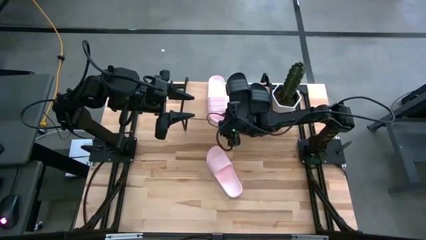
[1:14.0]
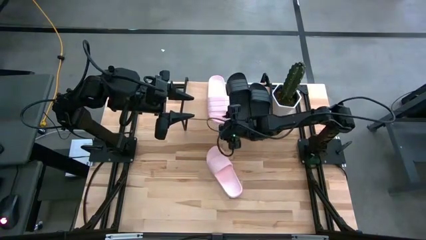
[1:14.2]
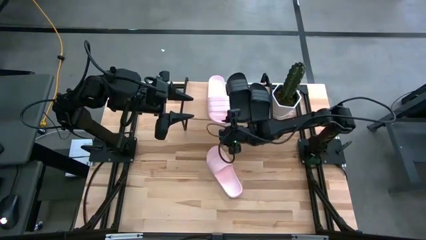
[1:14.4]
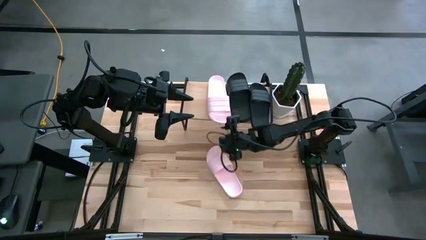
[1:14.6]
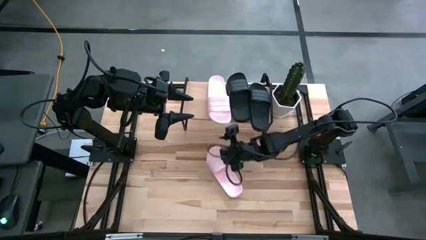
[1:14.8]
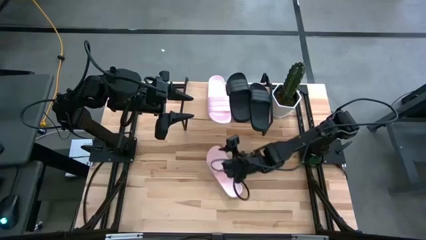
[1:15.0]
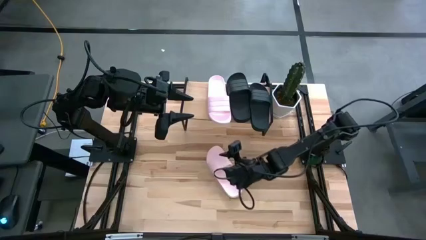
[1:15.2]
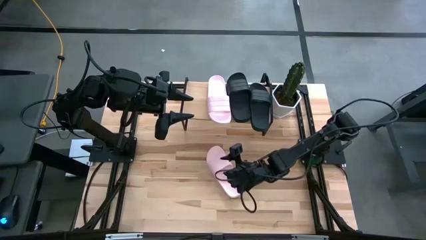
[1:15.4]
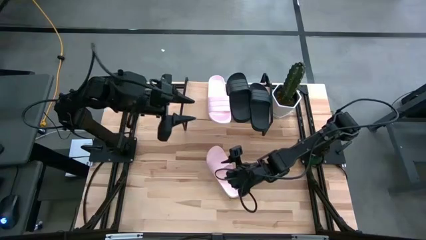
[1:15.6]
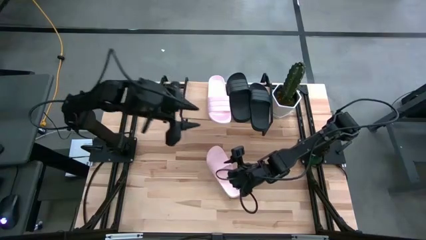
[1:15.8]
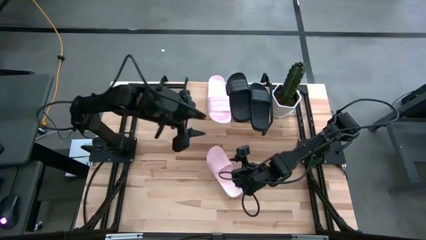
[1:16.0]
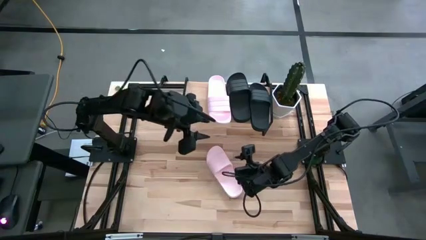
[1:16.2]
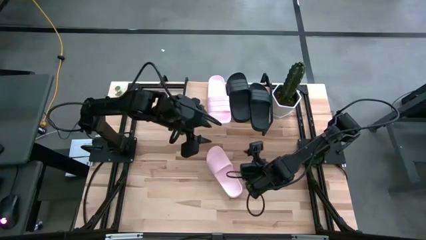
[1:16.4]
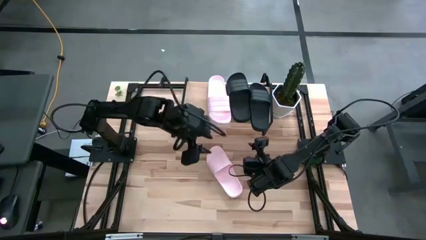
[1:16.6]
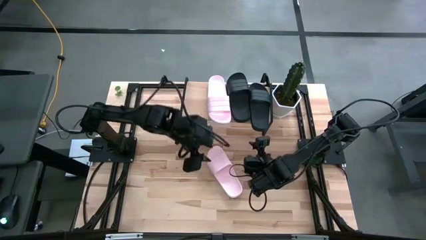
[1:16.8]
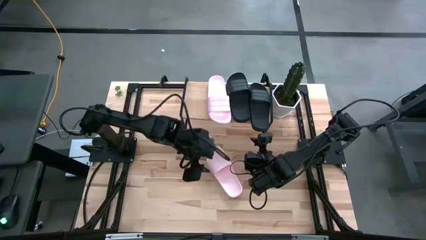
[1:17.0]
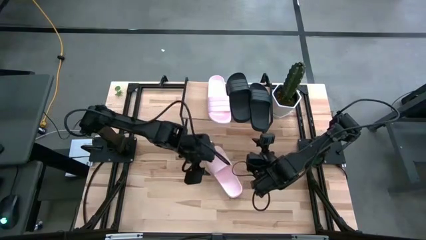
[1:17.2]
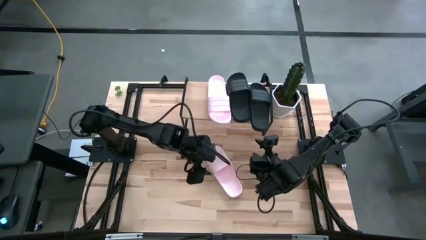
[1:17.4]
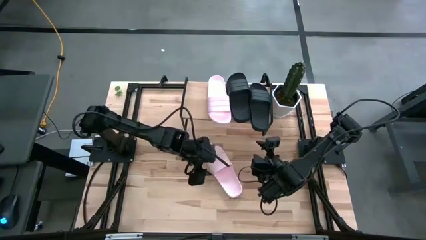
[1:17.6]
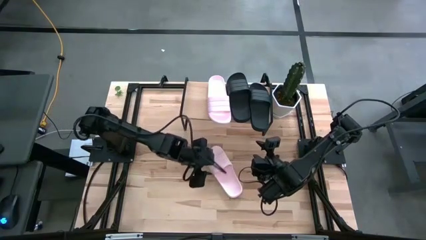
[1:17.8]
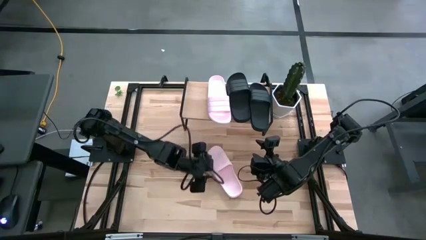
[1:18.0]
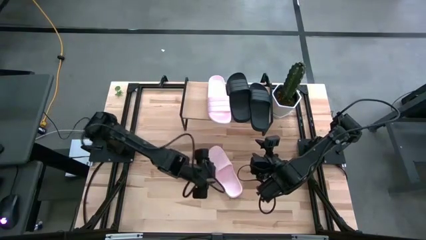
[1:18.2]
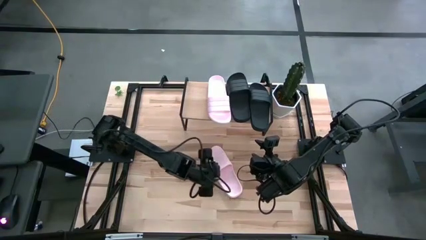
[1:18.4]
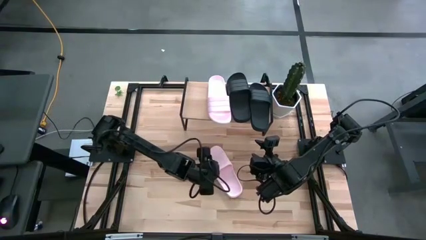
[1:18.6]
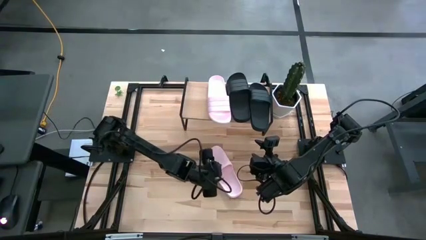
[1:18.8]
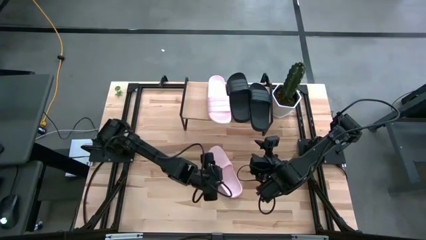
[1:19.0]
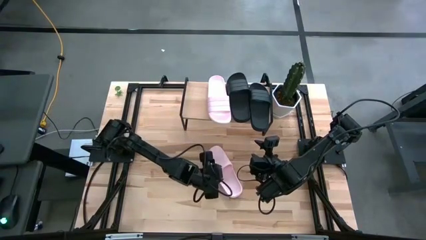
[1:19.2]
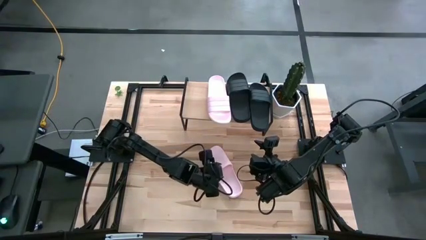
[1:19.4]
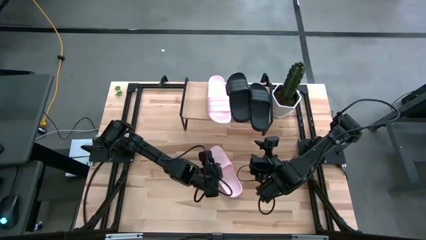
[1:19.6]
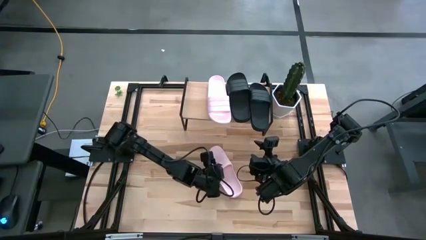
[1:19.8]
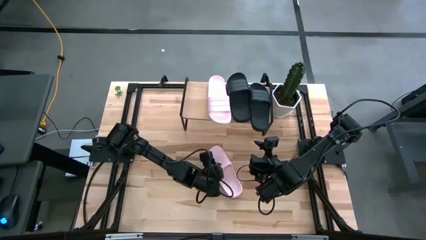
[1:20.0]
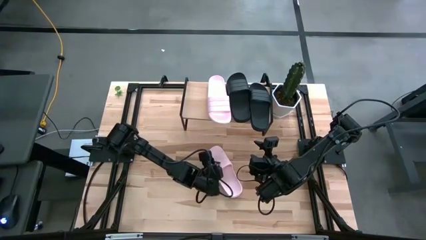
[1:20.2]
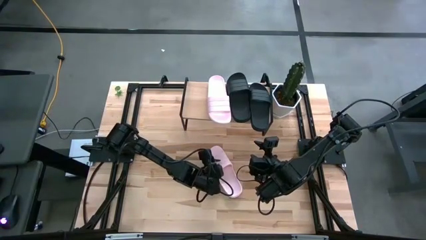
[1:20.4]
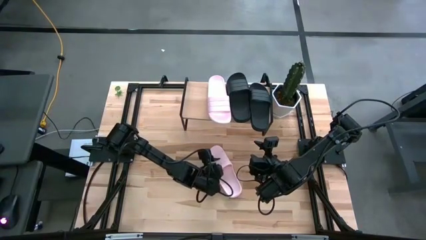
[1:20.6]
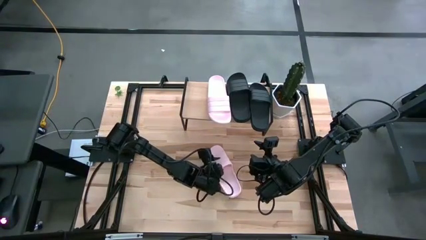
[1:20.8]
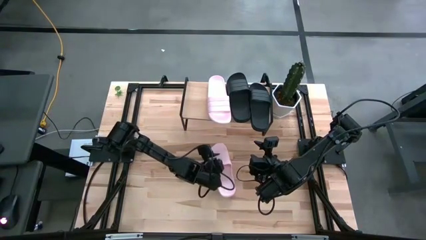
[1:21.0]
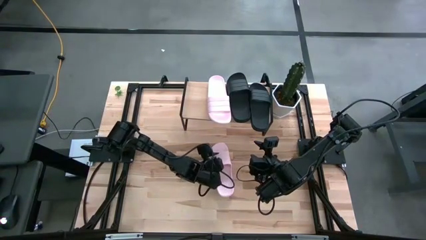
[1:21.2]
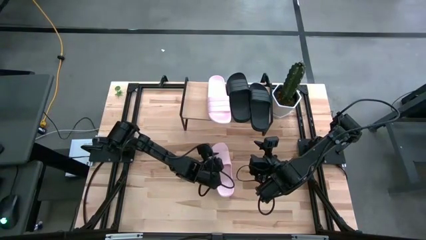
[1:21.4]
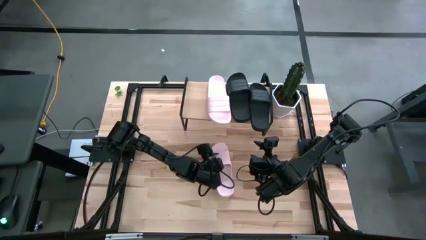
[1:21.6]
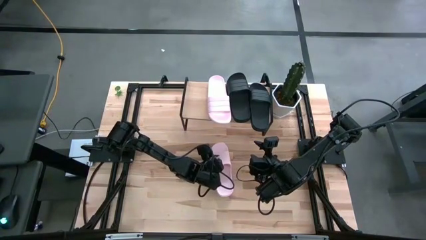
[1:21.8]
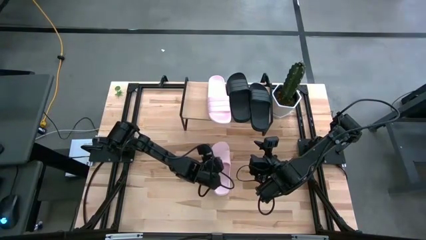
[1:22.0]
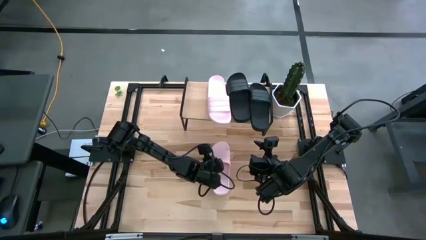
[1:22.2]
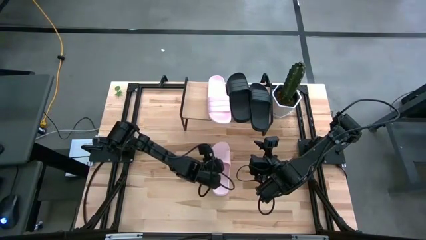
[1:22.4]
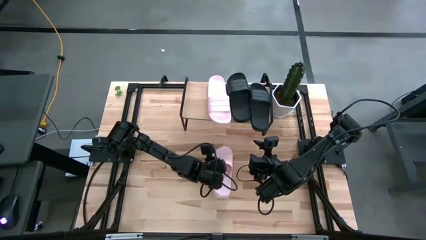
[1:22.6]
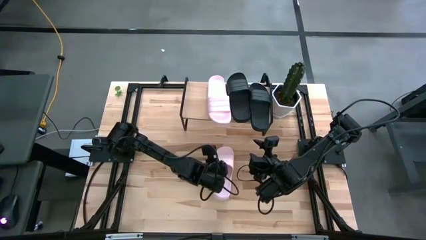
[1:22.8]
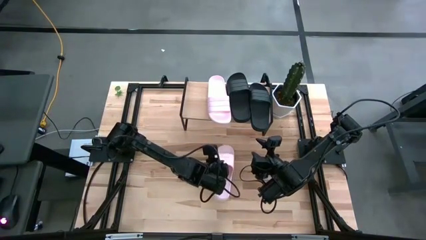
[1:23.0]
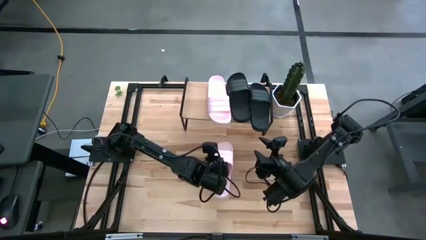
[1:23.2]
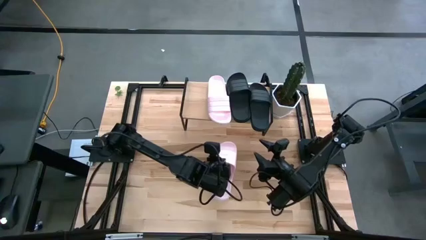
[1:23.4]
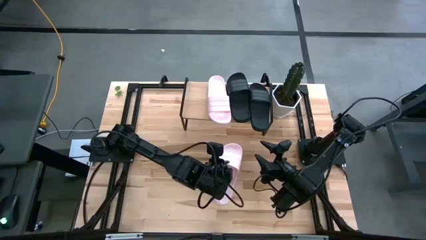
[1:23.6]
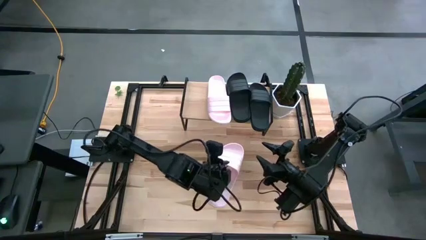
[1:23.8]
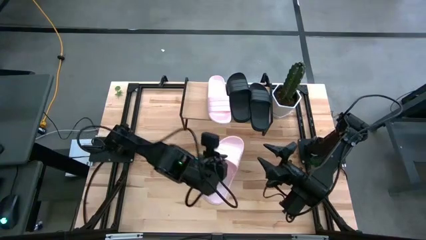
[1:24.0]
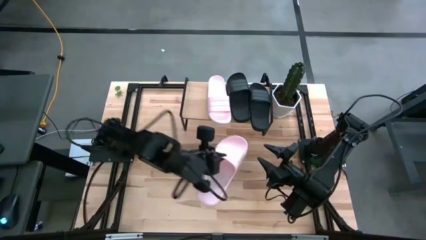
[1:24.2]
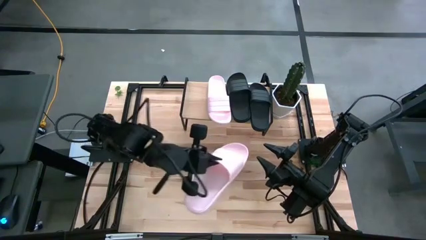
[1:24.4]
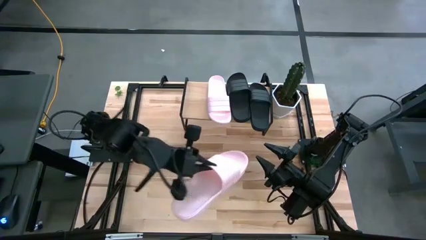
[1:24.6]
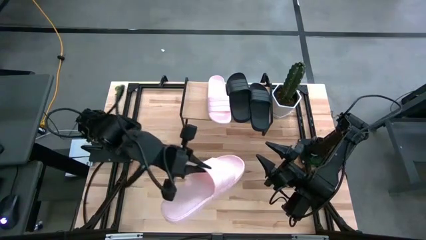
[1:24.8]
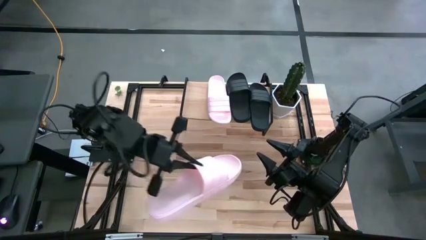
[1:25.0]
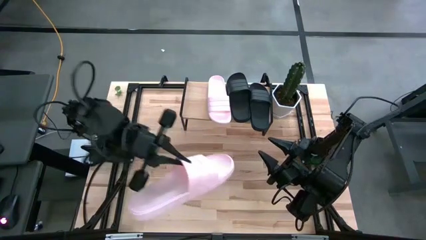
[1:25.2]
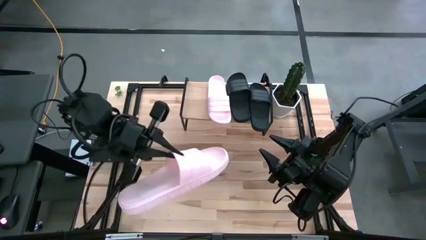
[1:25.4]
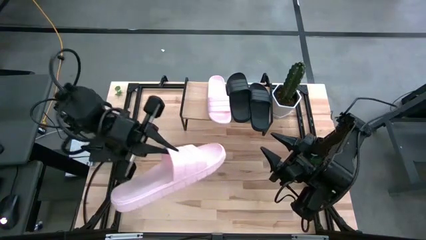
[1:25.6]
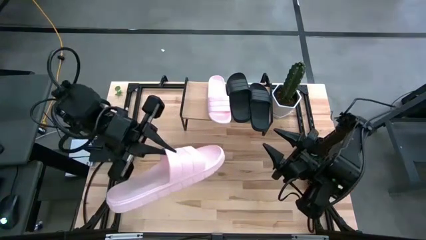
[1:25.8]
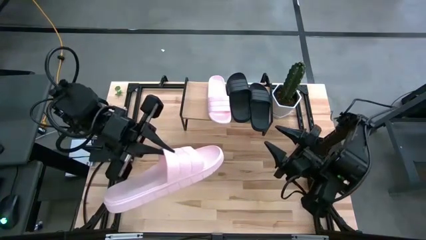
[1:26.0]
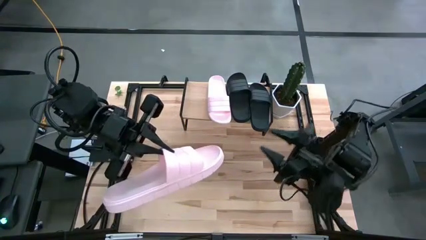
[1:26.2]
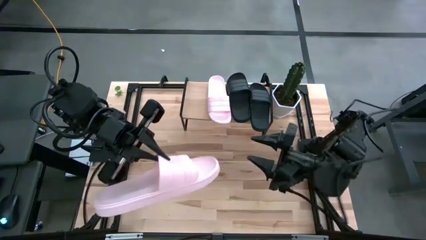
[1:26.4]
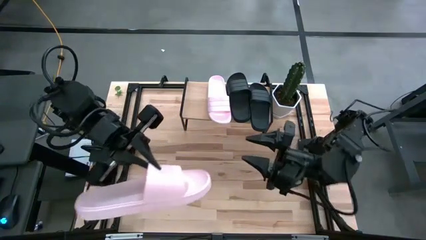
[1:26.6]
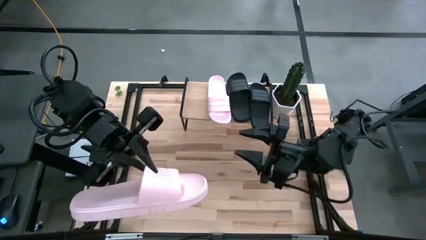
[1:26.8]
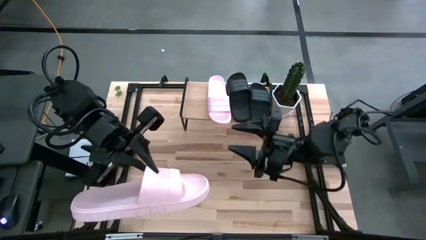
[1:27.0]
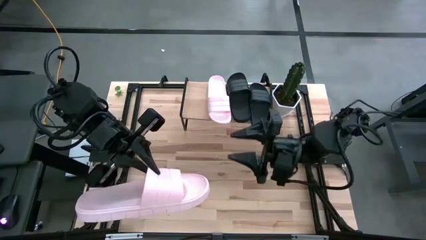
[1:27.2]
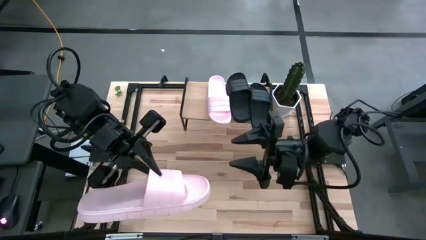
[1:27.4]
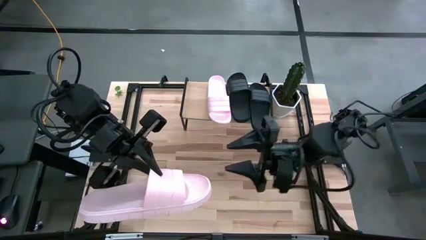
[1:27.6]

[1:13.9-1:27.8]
Task: Pick and place slides into the shelf
Put the pink slide on the shelf

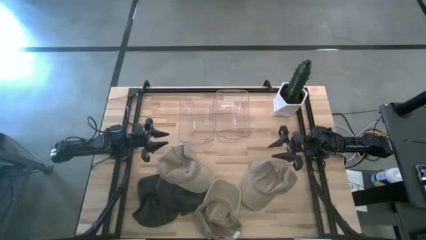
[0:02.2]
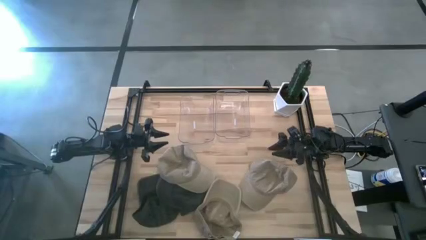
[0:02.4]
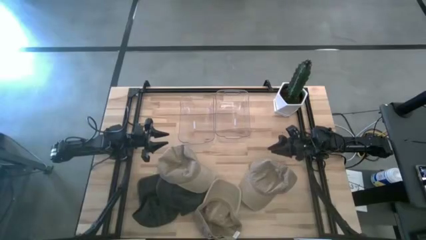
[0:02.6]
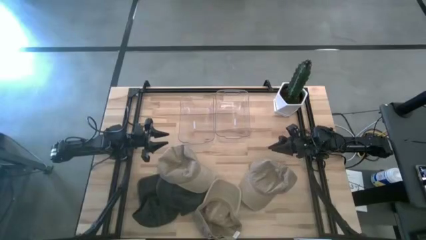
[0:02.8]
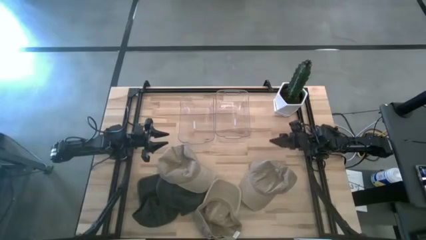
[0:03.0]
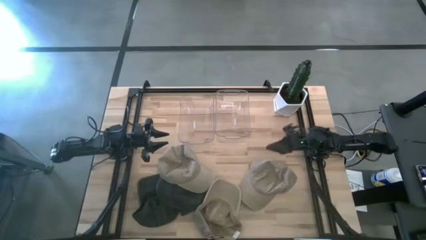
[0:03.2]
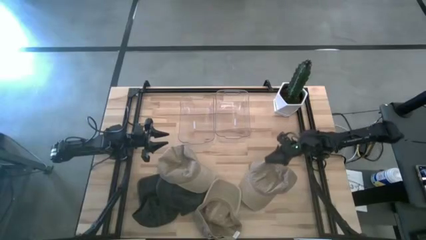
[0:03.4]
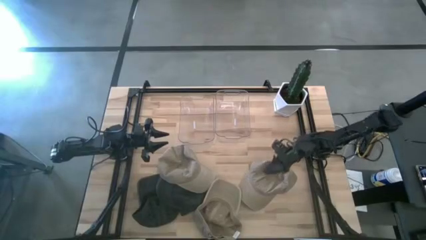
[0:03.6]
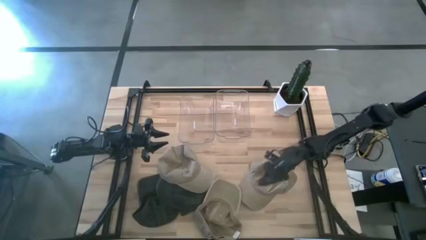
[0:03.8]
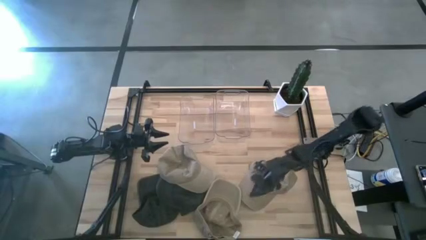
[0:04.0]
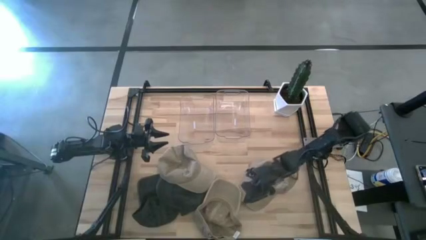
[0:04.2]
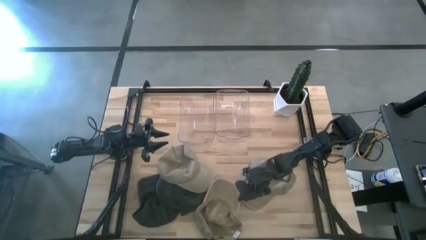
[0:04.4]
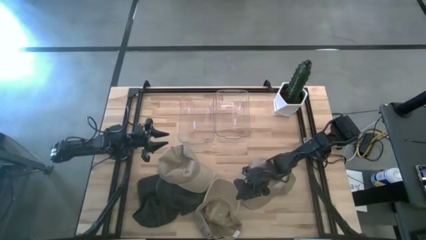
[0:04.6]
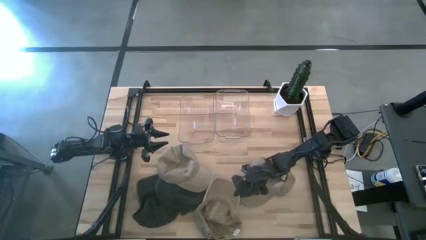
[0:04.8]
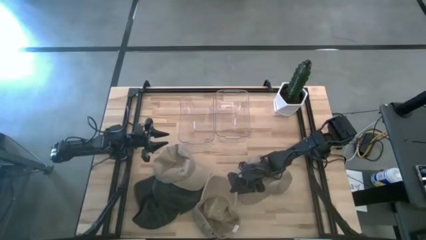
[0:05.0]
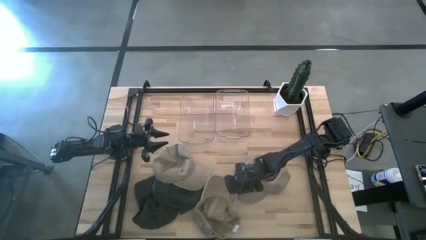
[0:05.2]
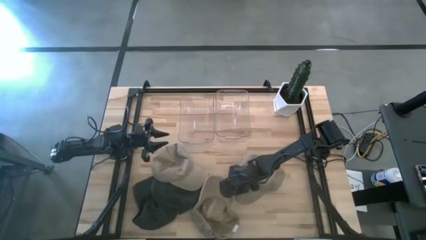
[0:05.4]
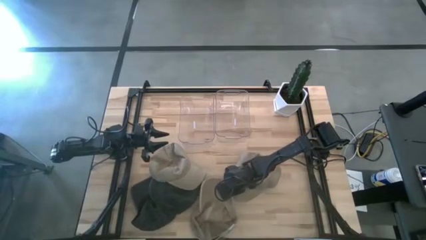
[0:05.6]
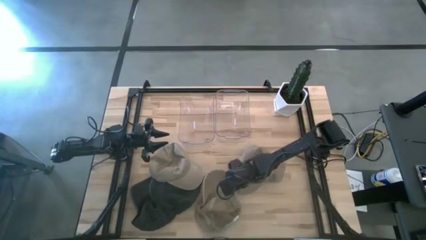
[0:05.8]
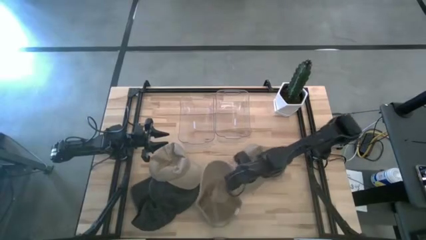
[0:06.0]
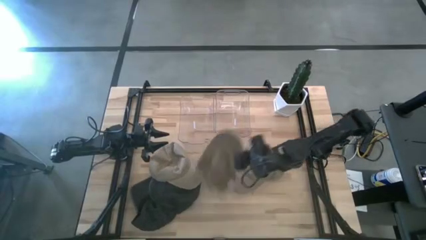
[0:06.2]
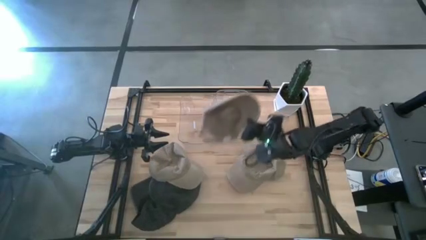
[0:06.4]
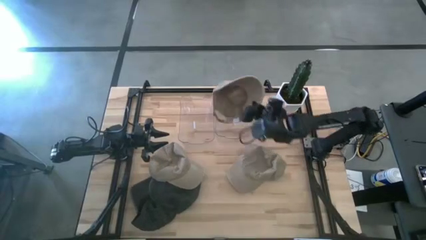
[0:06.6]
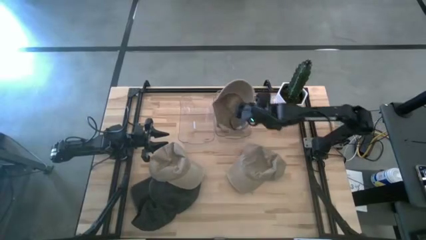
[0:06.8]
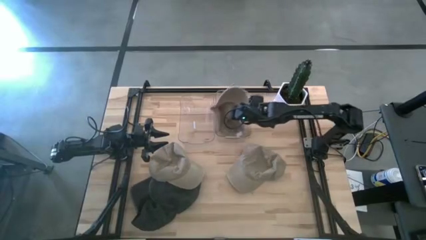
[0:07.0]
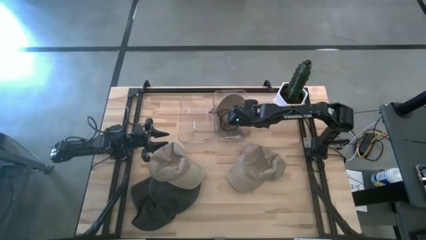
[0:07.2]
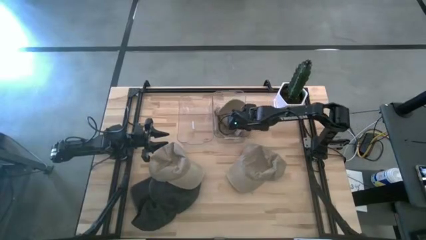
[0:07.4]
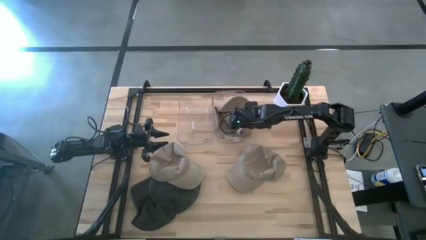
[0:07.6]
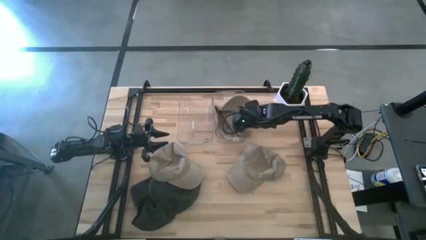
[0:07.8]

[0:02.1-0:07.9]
Task: Pick & Place hat
Put the bottom brown cap into the right transparent bin
